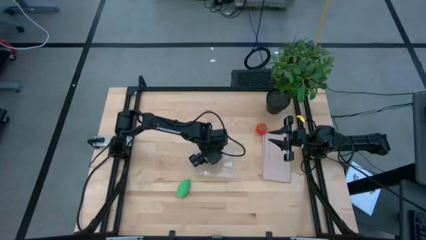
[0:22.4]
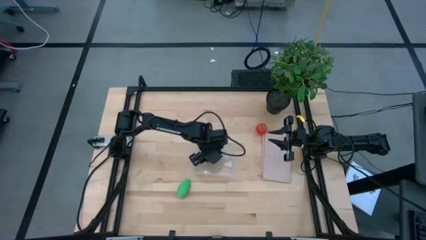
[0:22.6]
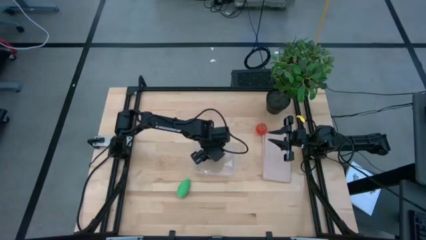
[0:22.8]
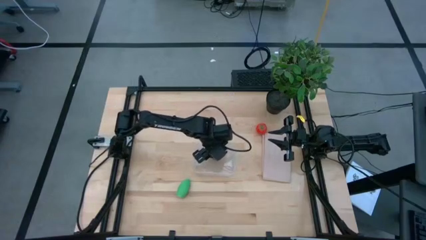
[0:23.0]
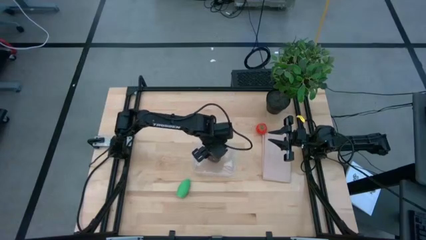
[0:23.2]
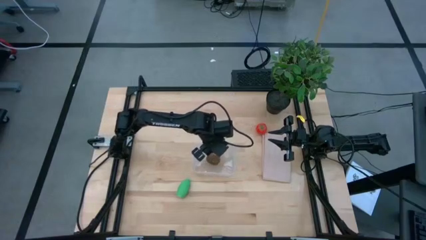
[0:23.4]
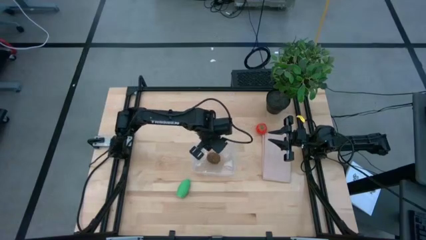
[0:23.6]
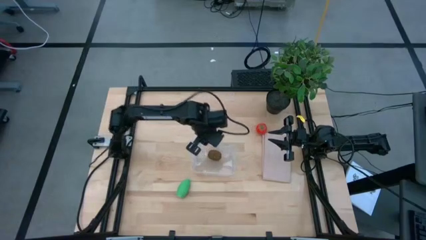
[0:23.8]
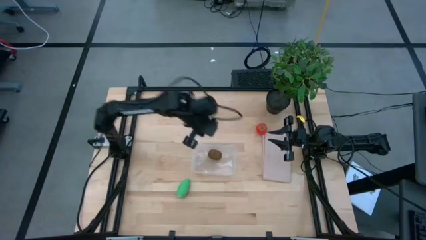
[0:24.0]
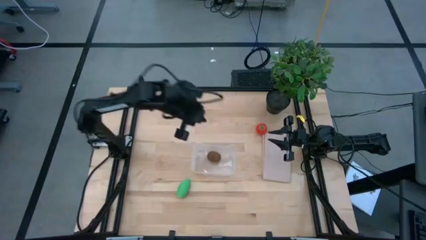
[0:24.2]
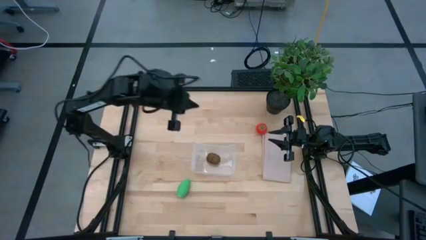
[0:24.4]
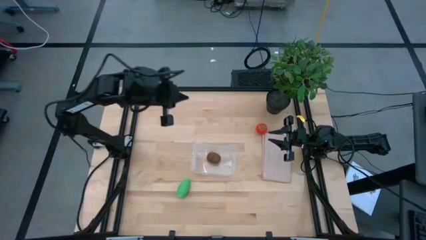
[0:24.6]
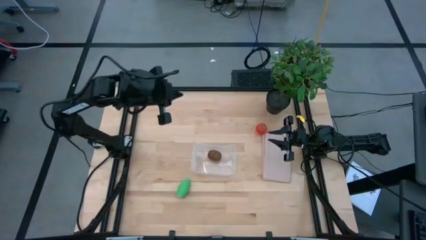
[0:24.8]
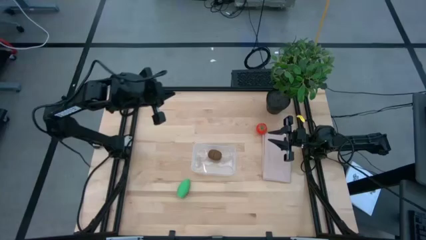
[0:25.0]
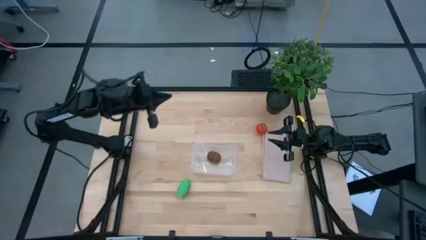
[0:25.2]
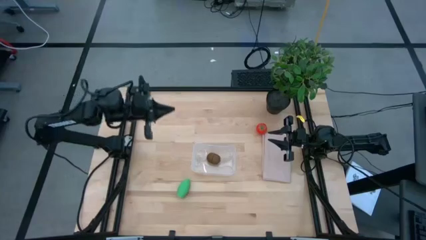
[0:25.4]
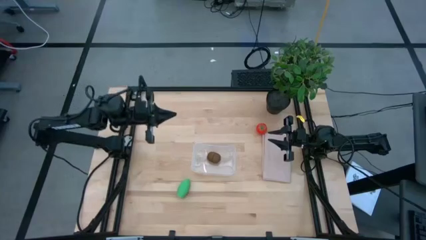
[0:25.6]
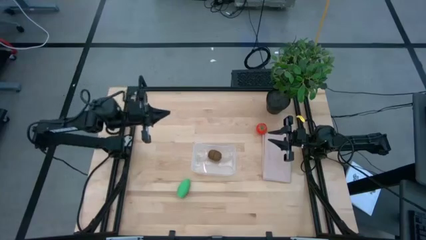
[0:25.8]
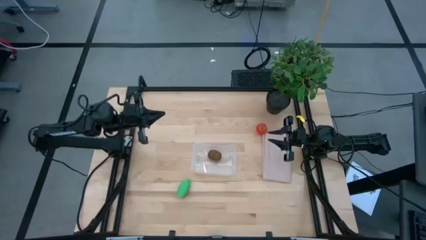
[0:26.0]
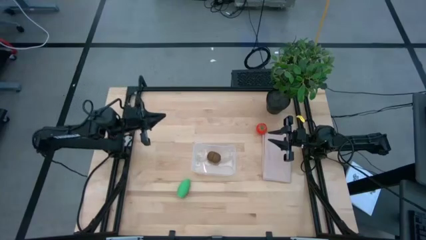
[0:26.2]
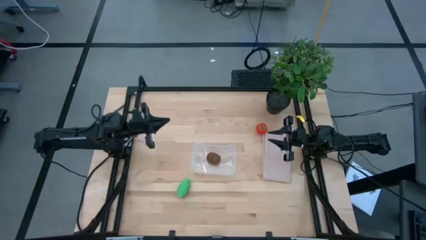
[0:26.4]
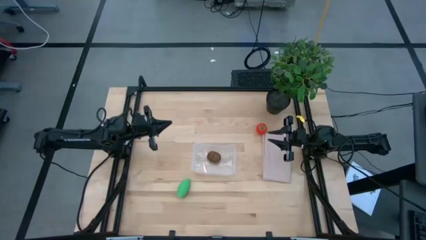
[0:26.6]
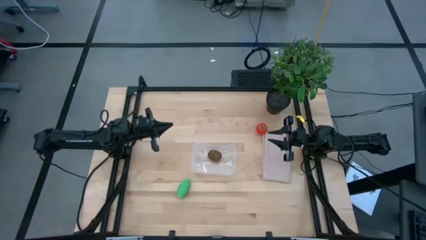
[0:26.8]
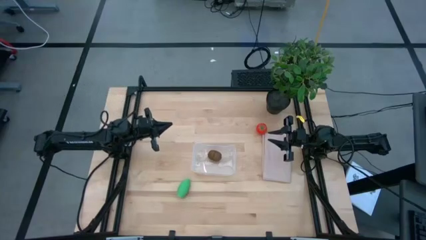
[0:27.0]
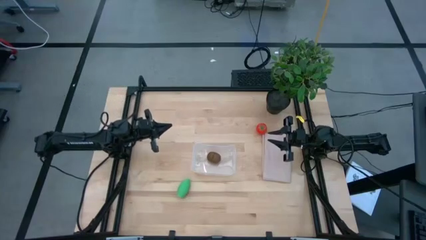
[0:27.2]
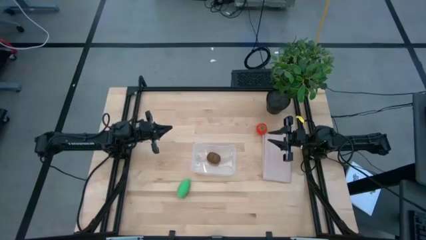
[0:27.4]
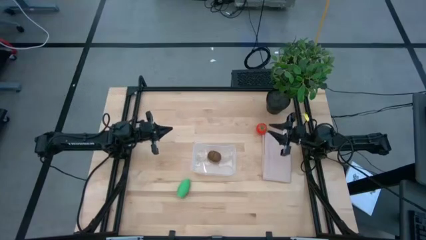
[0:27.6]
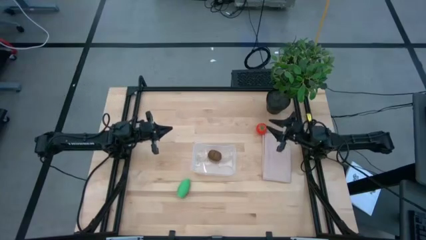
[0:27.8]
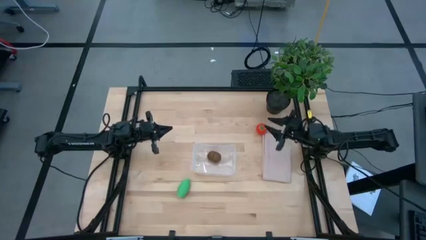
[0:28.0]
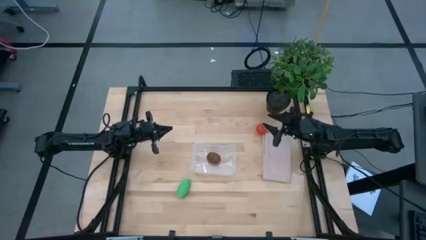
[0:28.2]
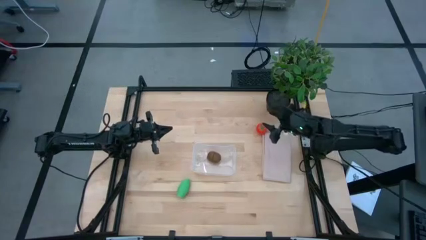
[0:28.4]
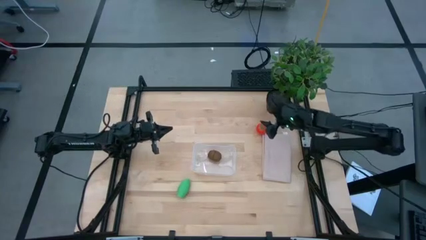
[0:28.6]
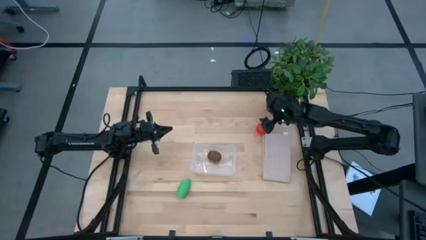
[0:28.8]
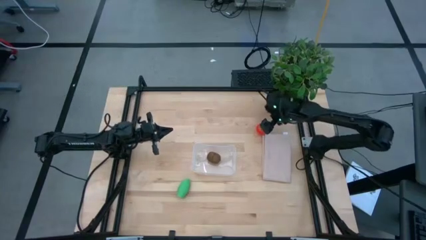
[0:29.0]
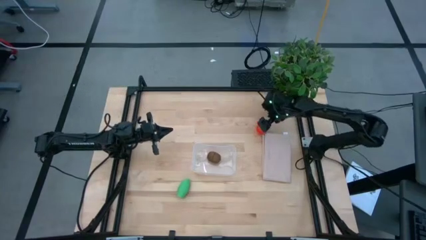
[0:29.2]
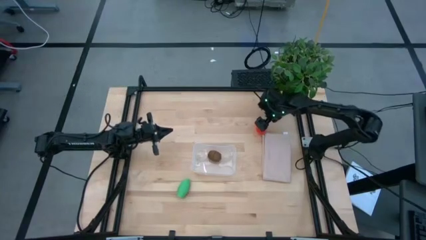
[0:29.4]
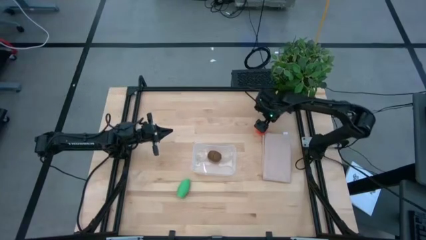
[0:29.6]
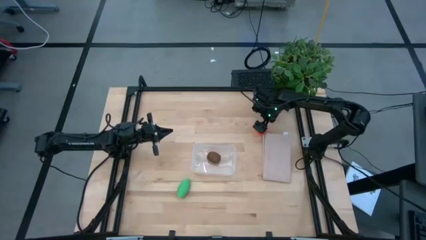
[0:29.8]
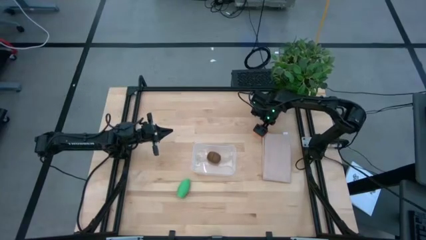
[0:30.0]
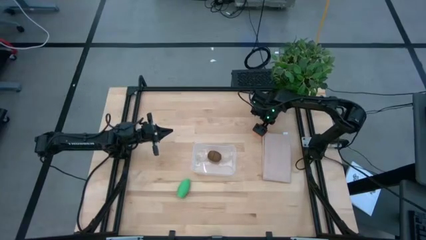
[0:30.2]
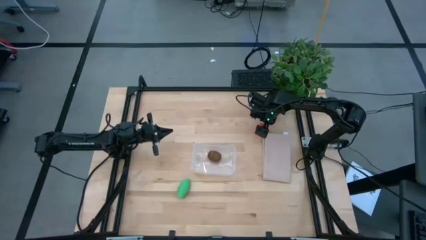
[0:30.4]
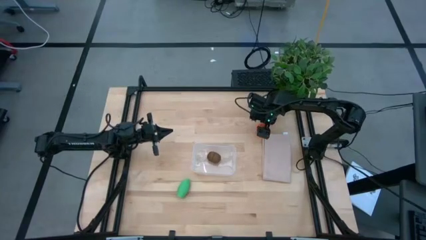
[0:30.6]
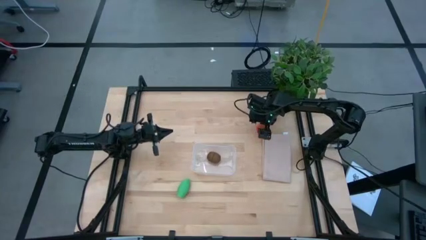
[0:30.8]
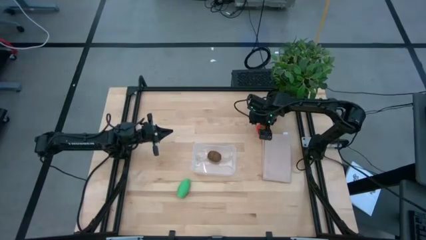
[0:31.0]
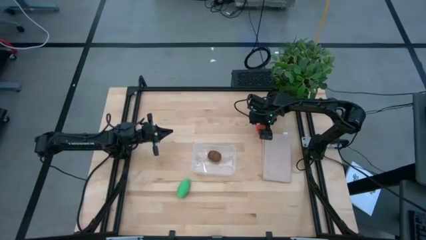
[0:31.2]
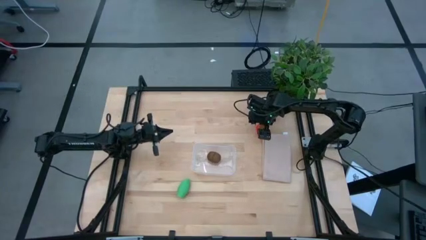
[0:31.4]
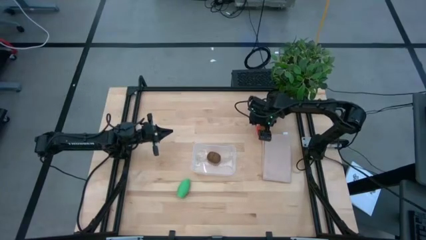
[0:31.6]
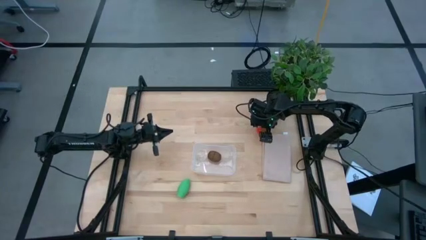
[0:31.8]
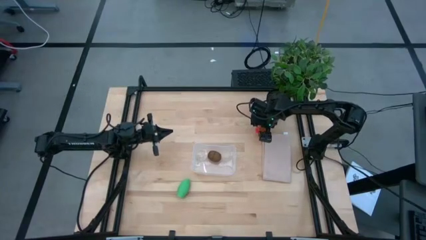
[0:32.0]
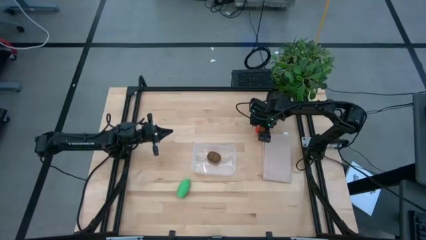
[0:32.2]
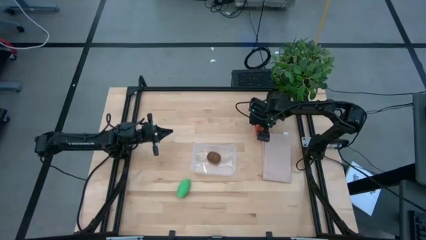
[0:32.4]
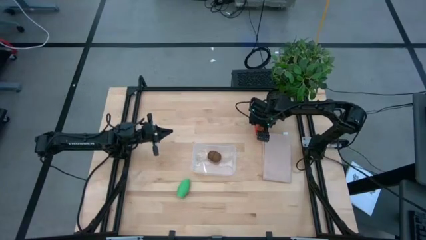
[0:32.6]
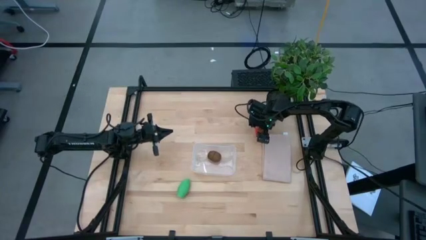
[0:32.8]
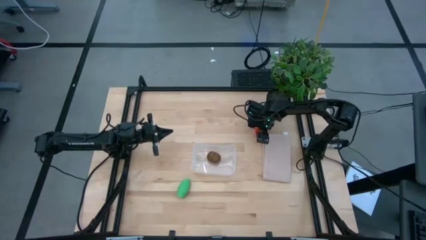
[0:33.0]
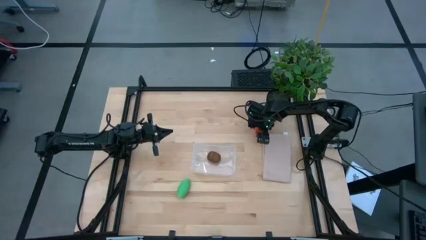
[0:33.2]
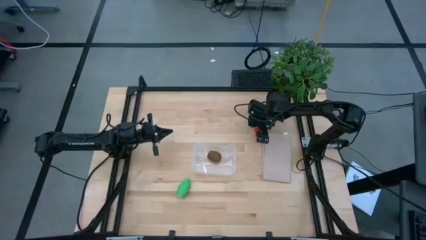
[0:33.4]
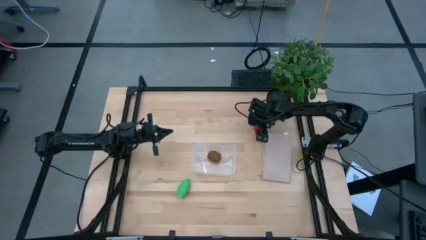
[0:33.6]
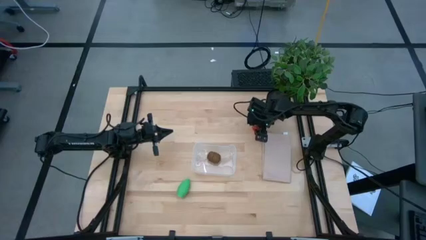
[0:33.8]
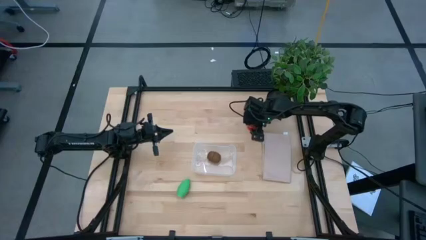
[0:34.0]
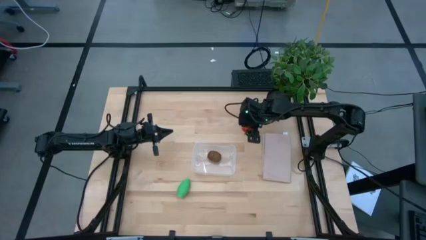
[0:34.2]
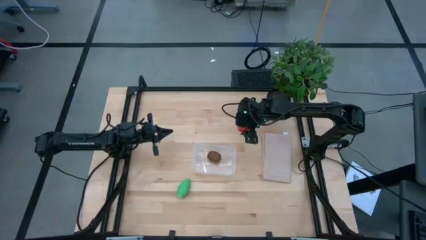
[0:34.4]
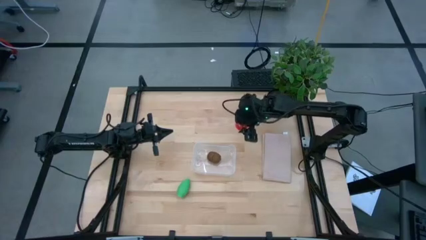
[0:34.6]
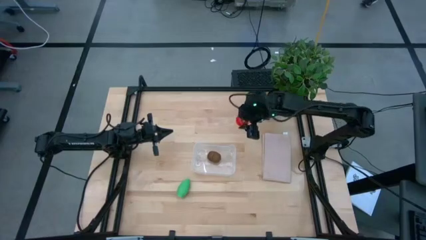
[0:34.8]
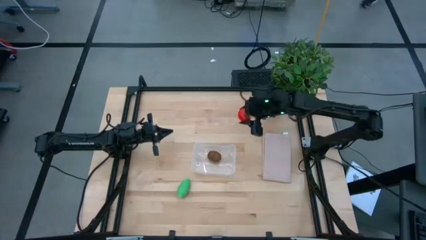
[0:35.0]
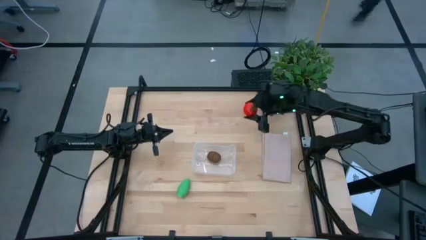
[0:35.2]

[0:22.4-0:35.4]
Task: Pick and placing Produce into tupperware
Put the tomato into the transparent bin

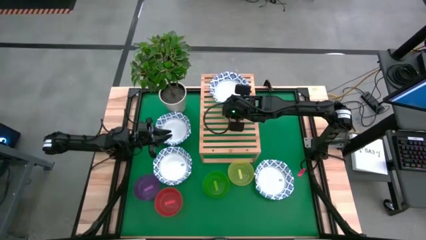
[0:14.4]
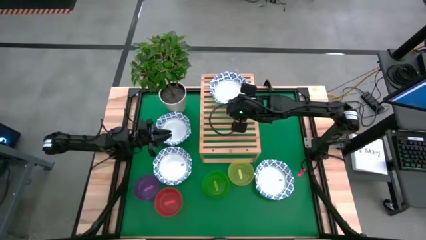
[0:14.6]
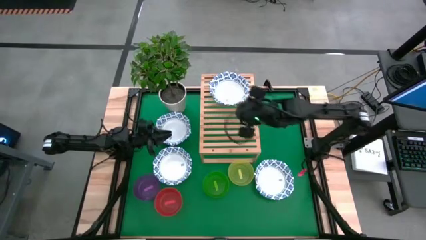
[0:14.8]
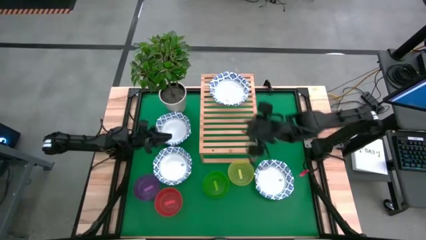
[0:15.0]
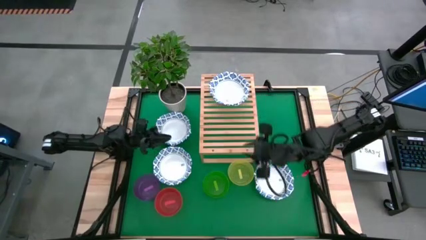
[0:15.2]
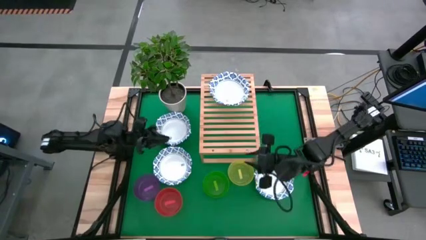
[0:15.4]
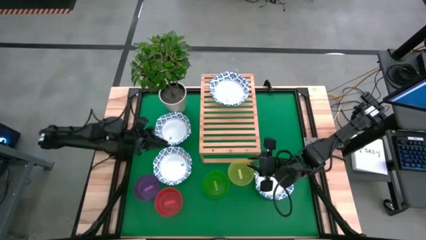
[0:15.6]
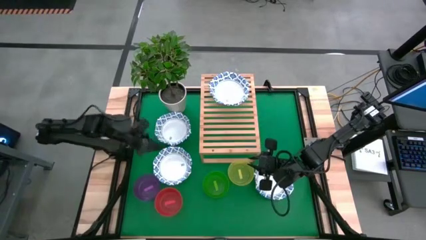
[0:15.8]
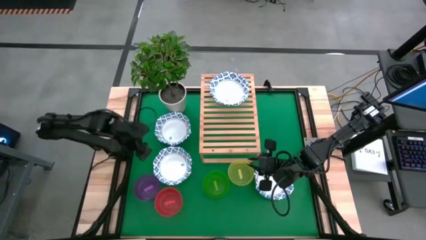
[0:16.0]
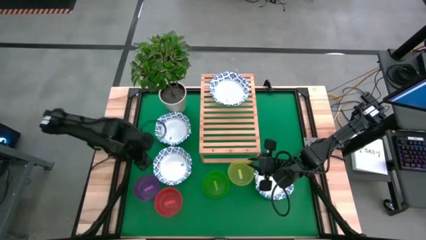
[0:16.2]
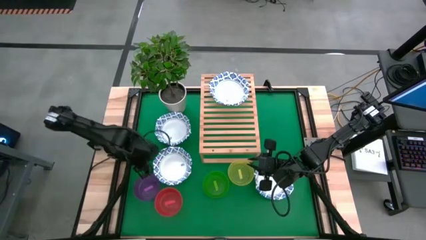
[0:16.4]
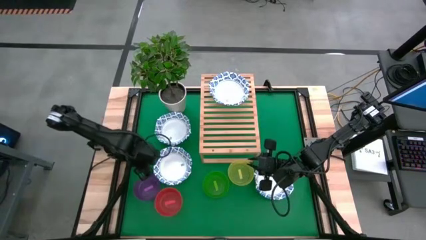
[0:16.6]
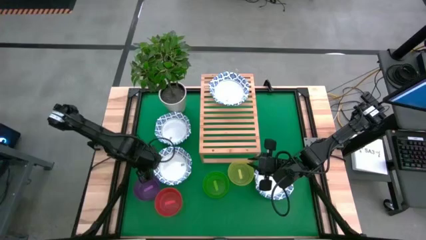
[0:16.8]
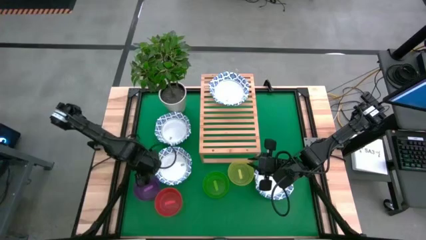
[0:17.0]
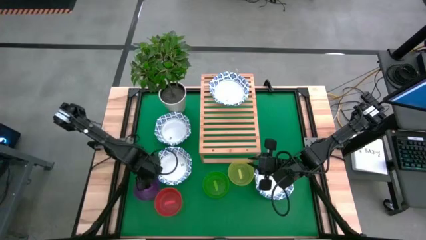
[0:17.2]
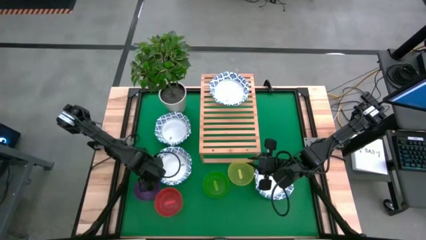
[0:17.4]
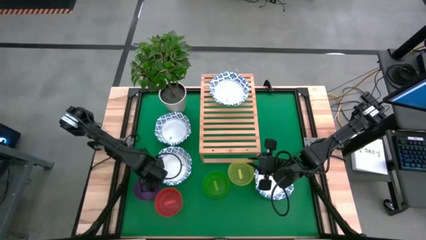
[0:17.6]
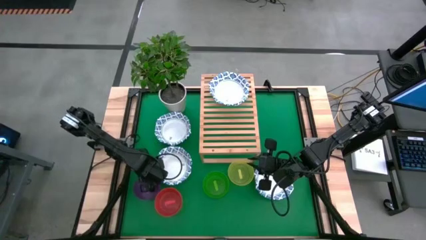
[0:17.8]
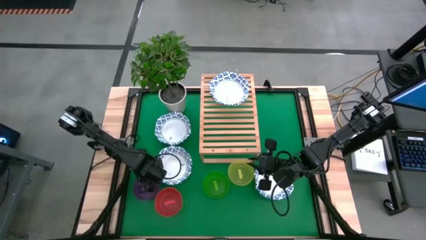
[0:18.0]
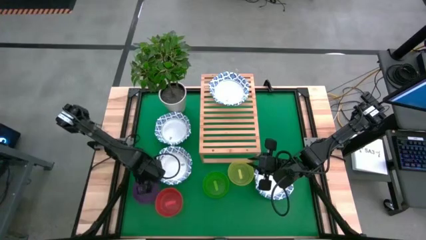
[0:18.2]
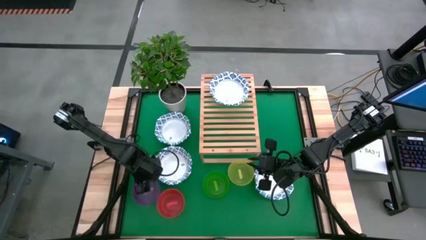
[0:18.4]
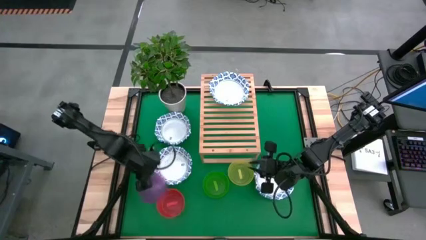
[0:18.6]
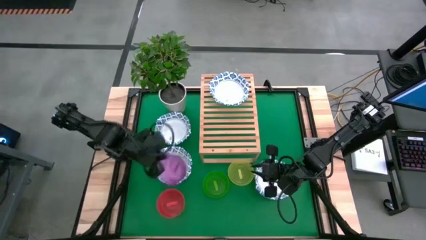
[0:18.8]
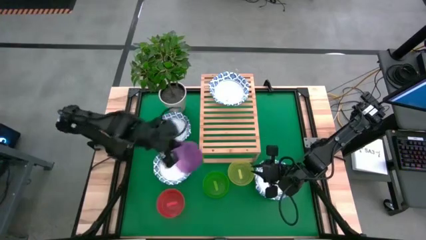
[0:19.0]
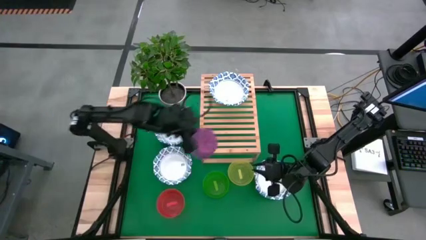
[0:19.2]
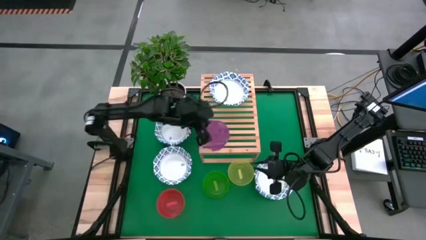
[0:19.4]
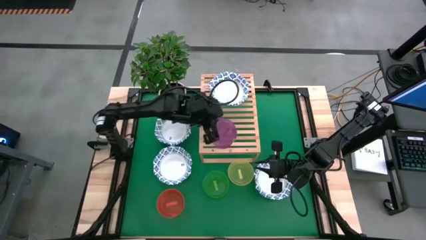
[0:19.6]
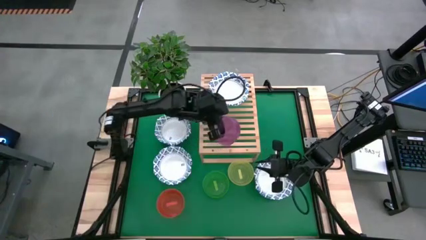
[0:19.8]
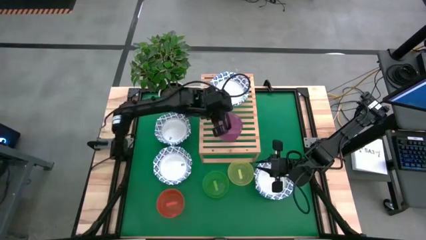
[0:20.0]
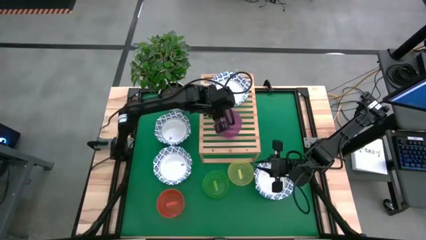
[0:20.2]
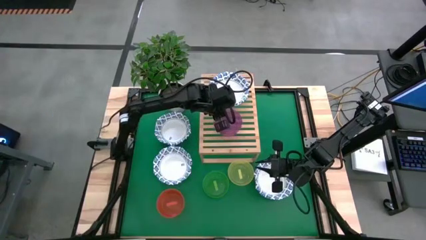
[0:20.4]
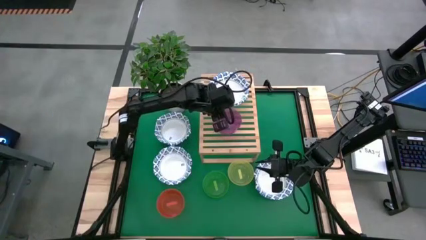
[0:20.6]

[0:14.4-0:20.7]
Task: Place and stack bowls onto a shelf
Put the violet bowl on the shelf
